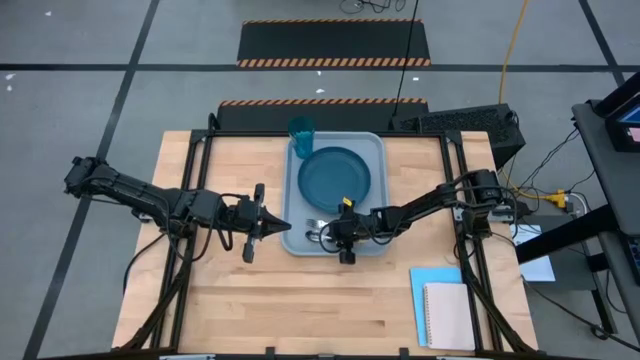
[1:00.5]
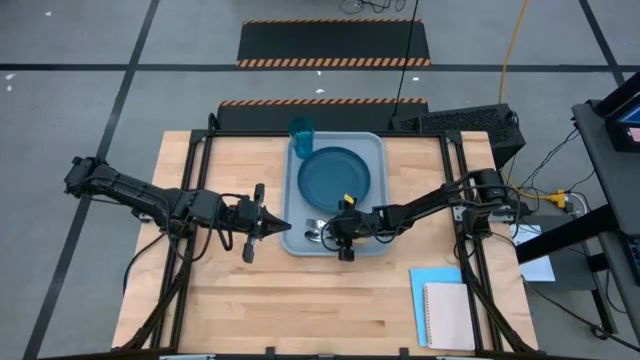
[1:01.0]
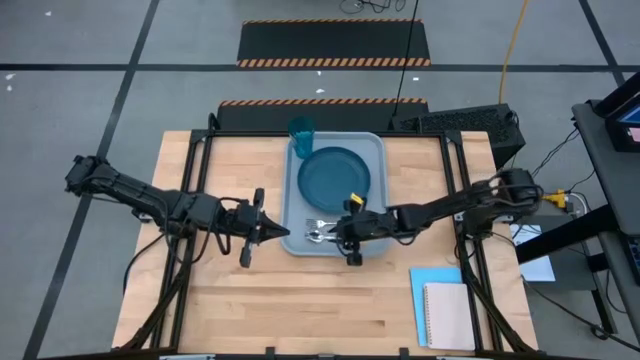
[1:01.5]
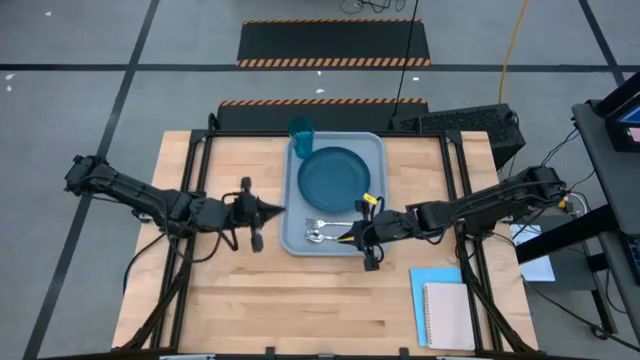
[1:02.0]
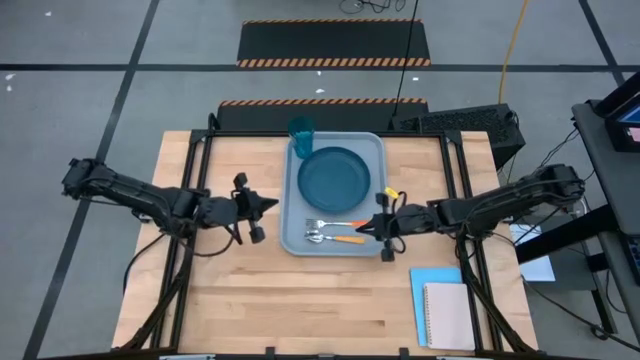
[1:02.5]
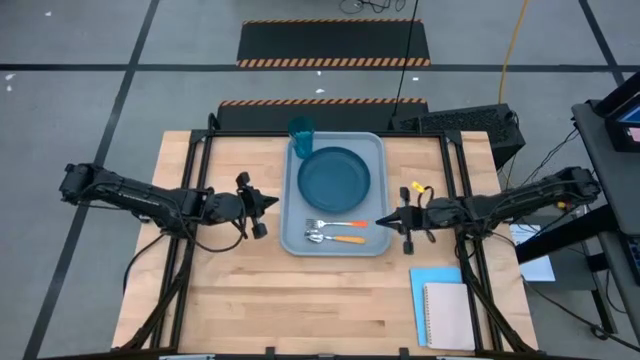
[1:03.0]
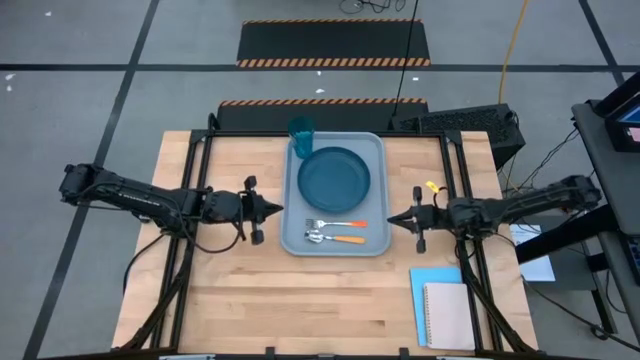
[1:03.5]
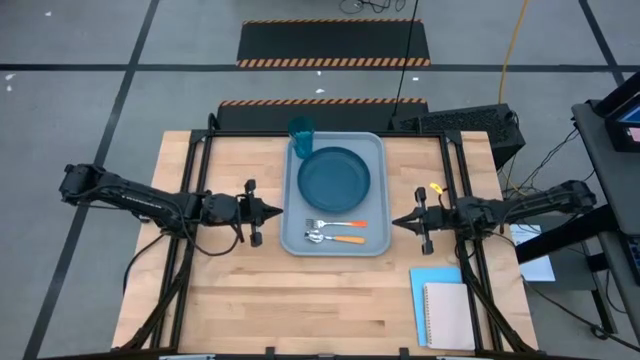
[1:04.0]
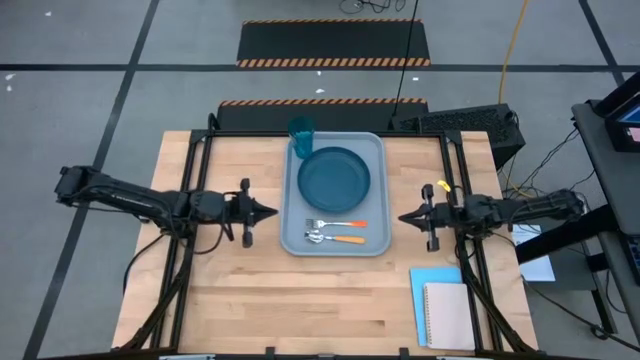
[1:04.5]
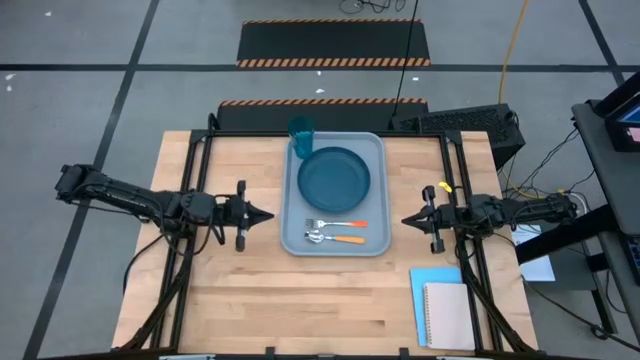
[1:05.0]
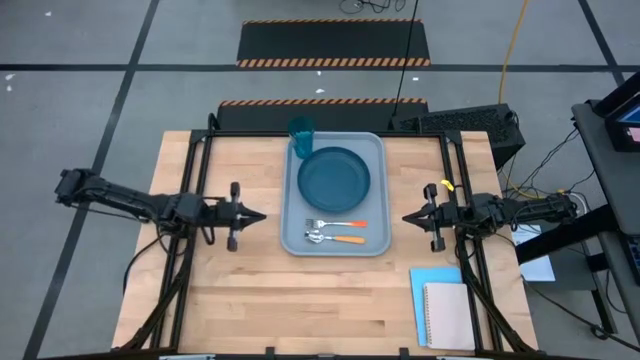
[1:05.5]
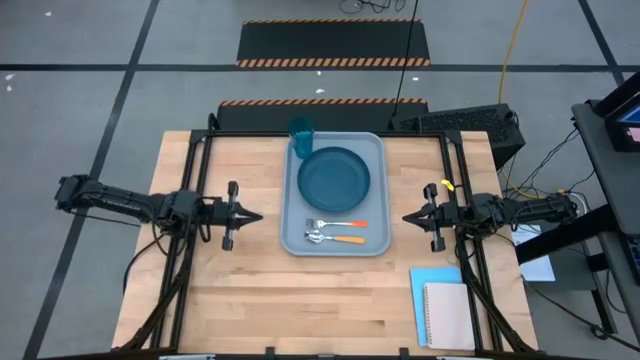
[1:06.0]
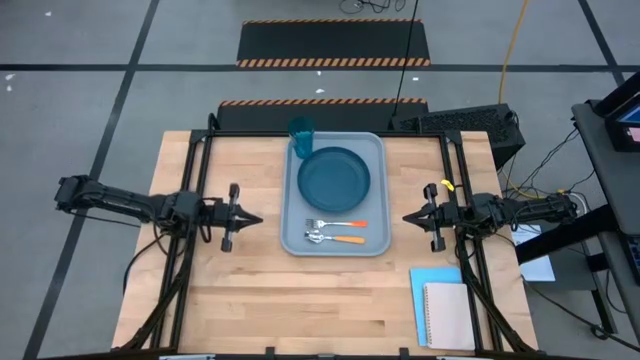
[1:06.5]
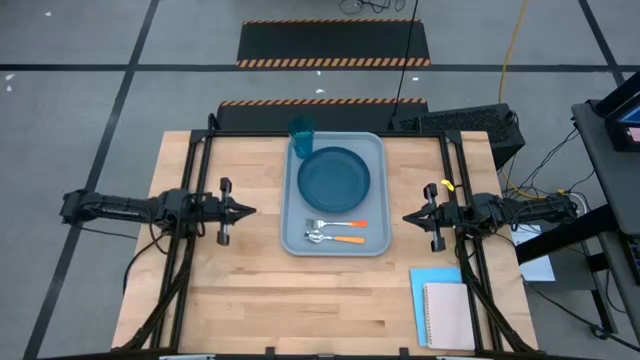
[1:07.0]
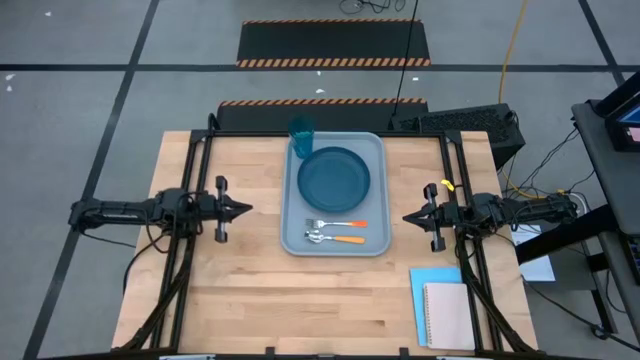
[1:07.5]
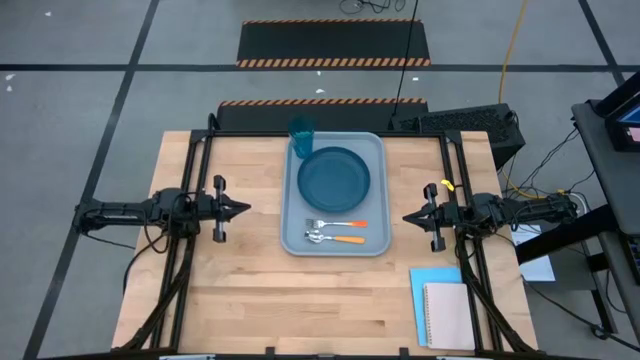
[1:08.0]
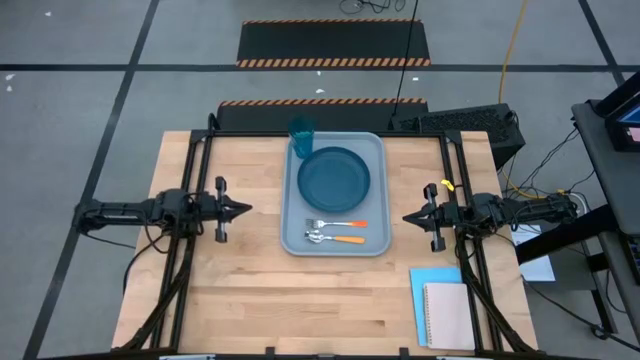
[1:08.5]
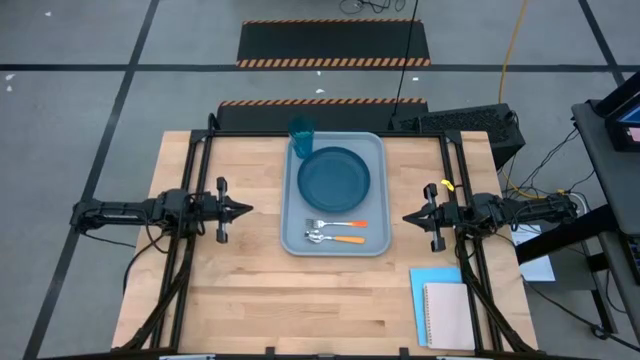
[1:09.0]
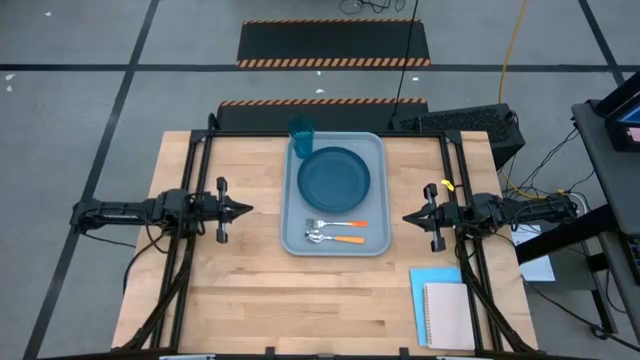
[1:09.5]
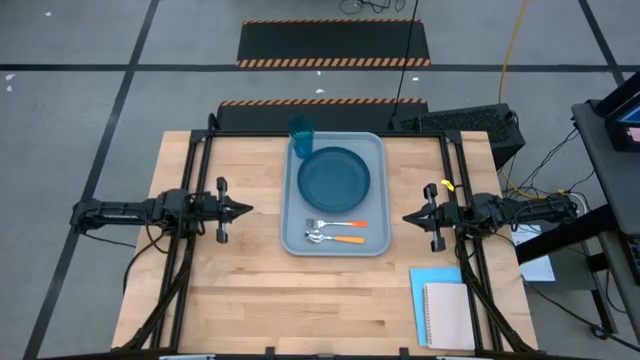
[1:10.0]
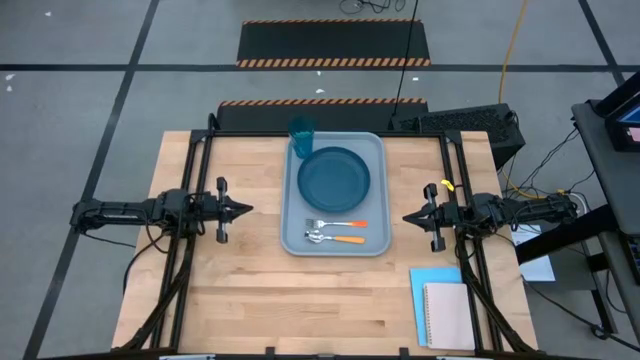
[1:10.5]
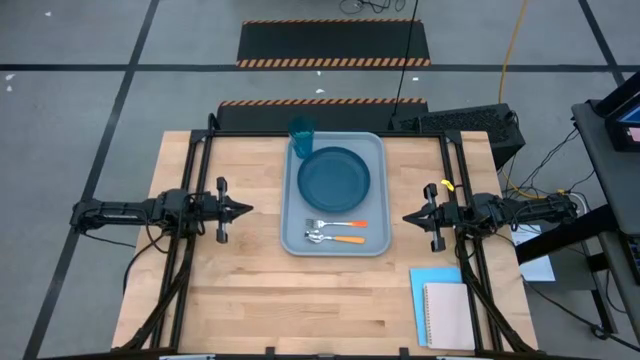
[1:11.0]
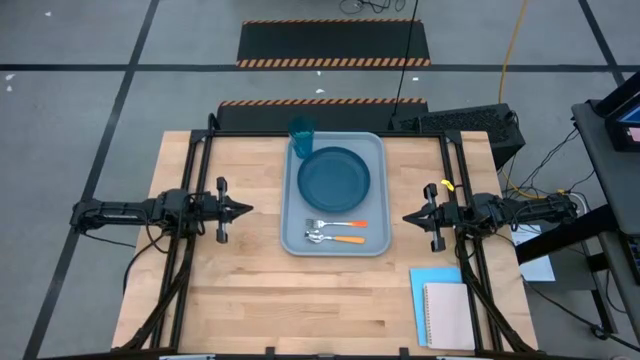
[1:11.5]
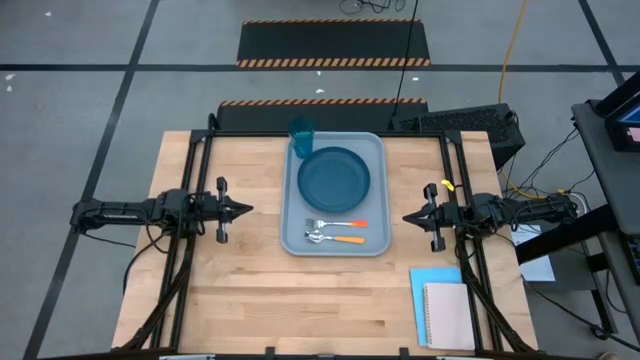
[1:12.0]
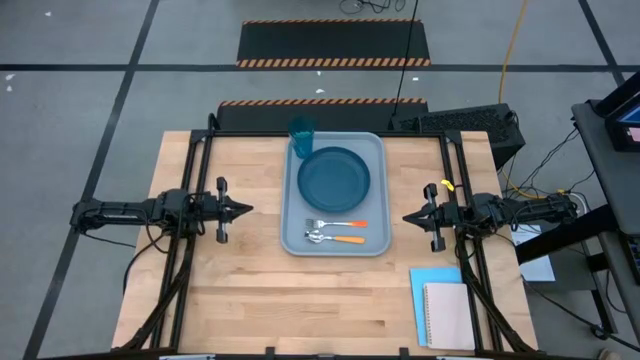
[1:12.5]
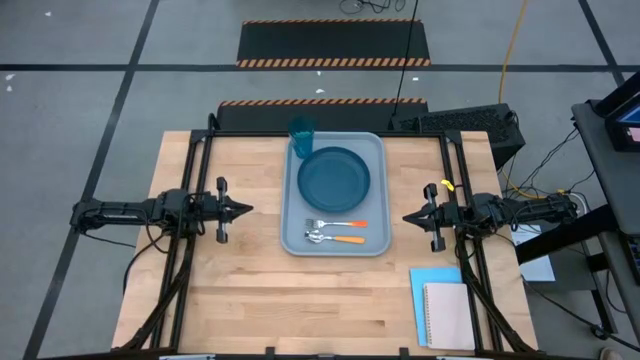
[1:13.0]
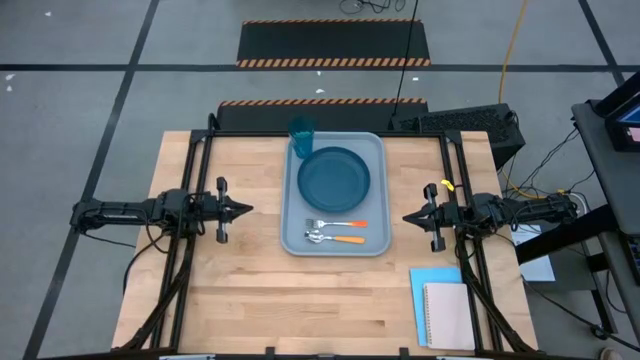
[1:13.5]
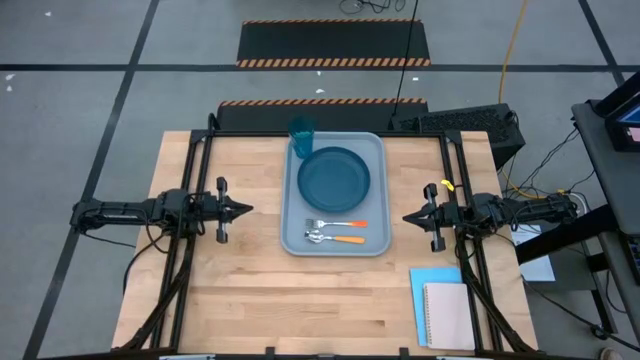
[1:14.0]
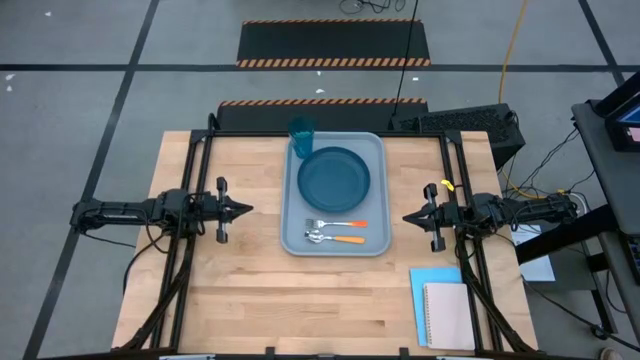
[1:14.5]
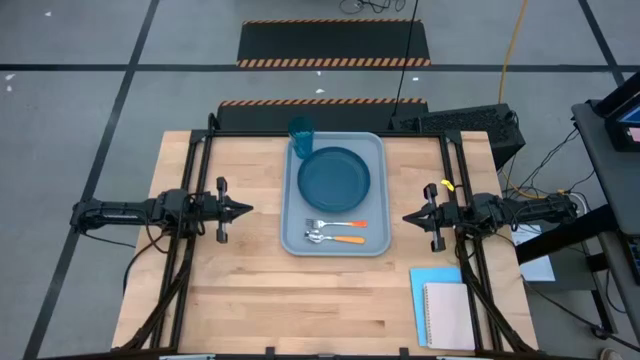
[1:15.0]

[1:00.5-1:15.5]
Task: Pick and place plate/cup/fork/spoon on tray
Return to Home Position
